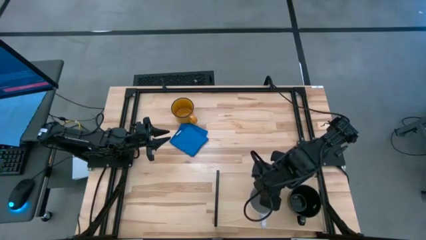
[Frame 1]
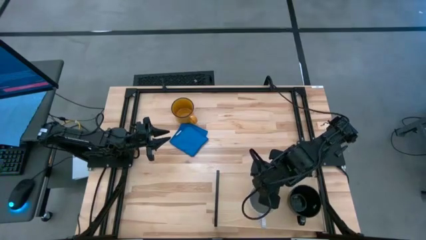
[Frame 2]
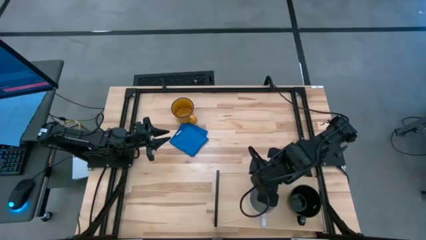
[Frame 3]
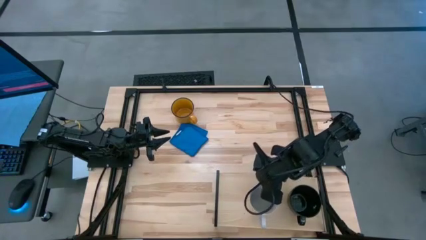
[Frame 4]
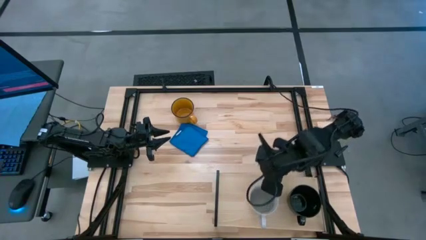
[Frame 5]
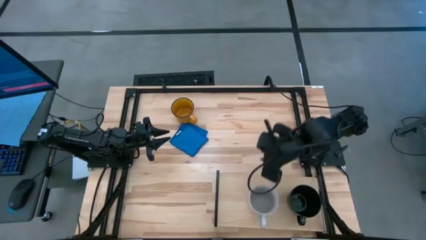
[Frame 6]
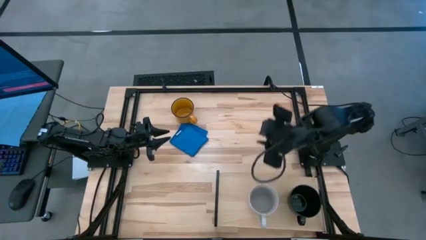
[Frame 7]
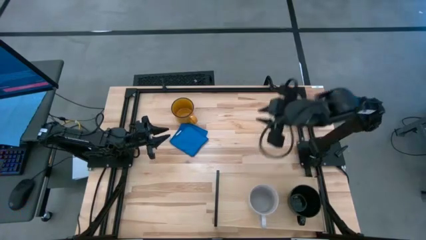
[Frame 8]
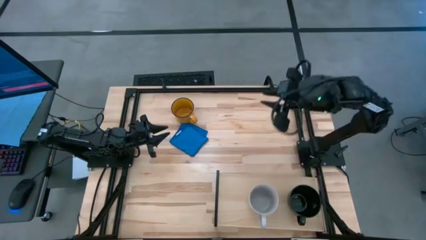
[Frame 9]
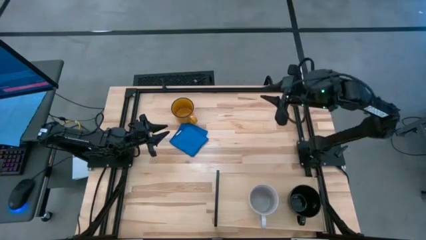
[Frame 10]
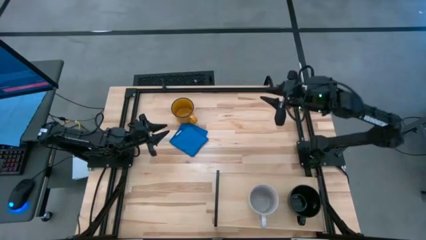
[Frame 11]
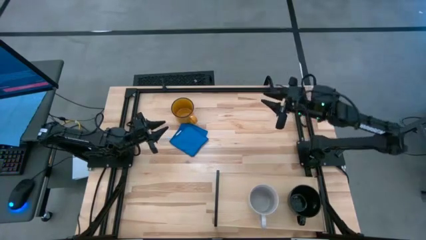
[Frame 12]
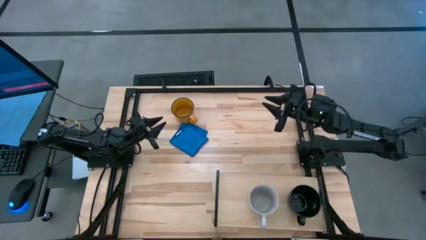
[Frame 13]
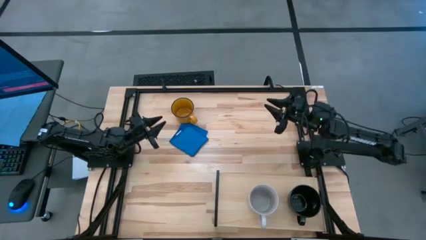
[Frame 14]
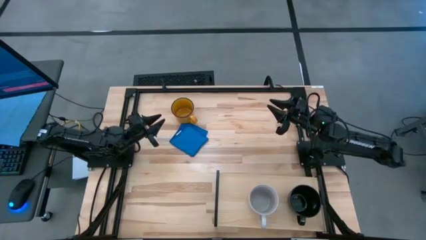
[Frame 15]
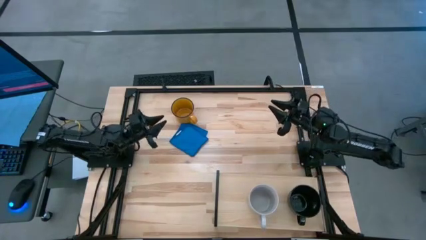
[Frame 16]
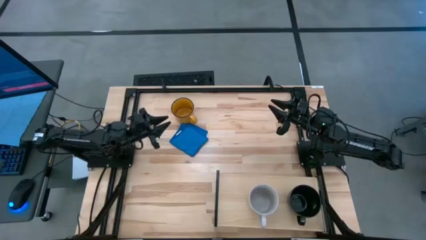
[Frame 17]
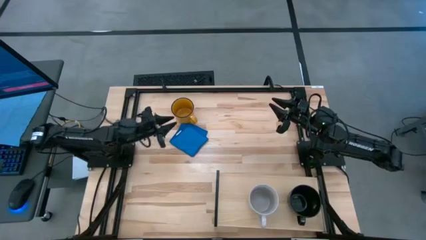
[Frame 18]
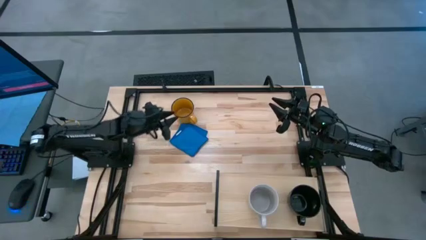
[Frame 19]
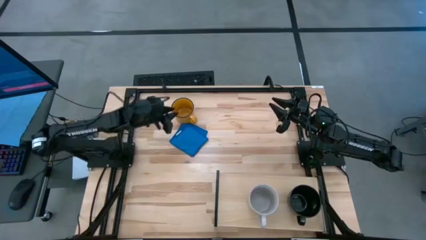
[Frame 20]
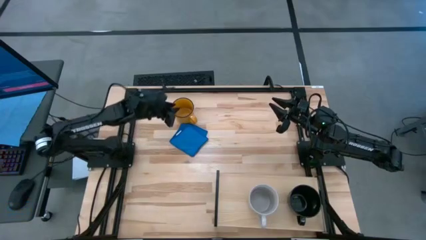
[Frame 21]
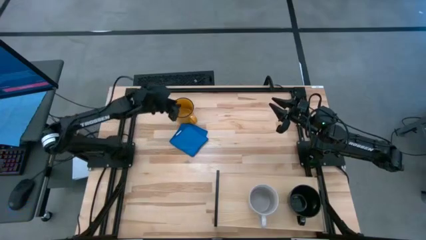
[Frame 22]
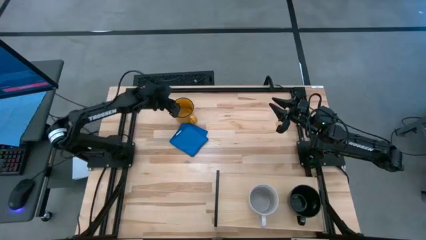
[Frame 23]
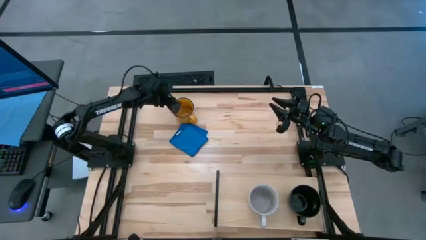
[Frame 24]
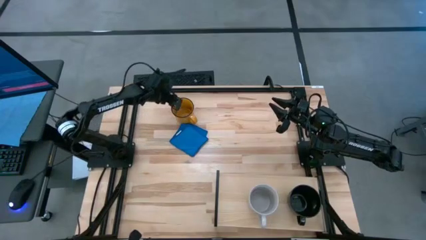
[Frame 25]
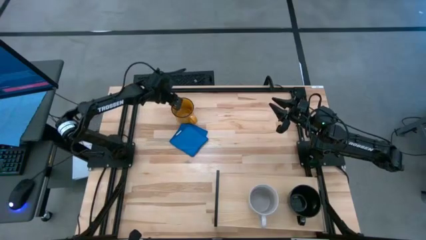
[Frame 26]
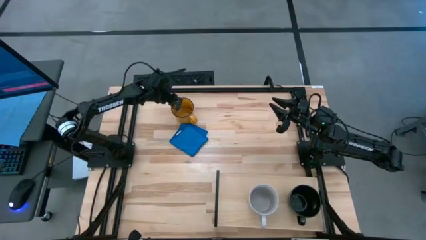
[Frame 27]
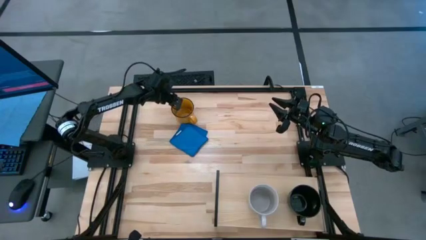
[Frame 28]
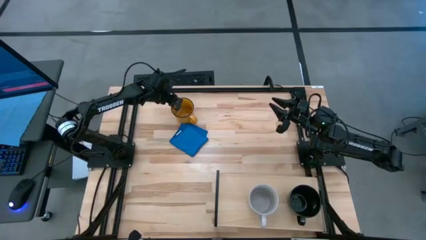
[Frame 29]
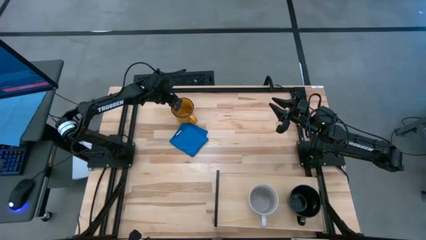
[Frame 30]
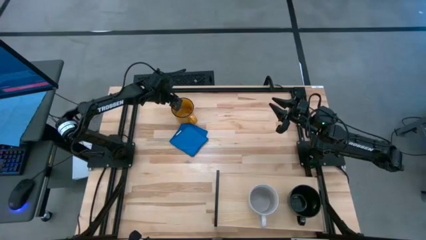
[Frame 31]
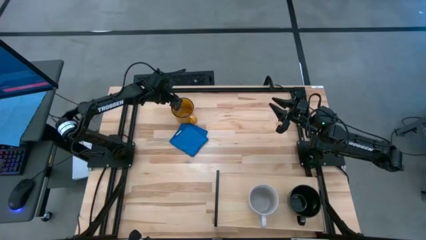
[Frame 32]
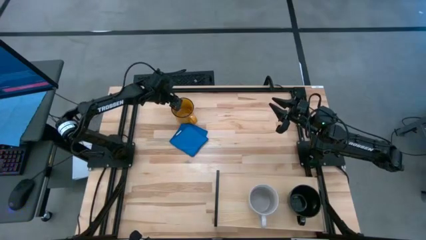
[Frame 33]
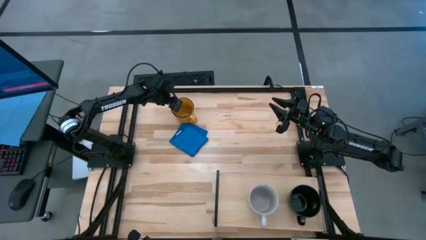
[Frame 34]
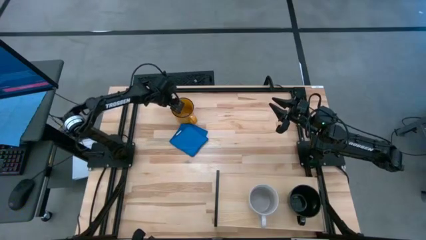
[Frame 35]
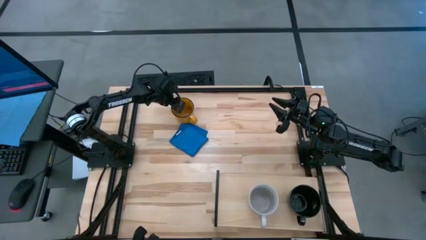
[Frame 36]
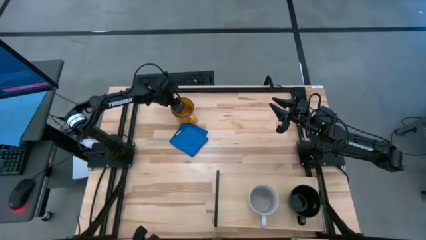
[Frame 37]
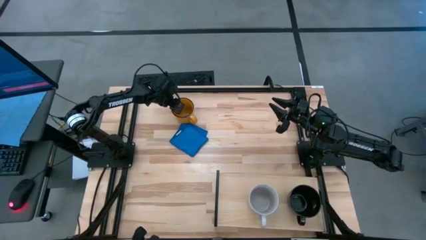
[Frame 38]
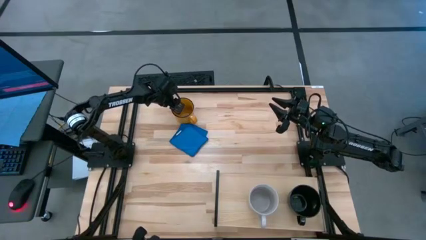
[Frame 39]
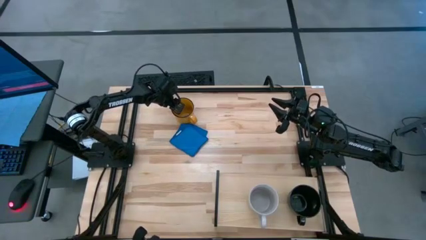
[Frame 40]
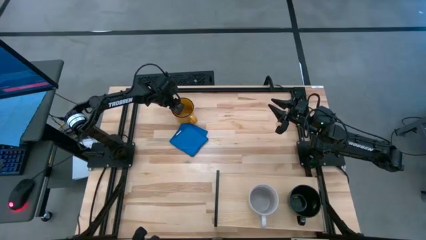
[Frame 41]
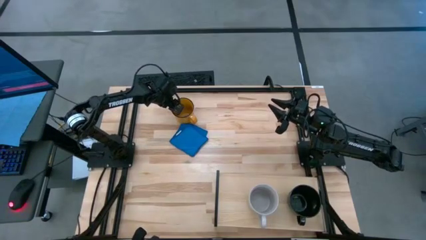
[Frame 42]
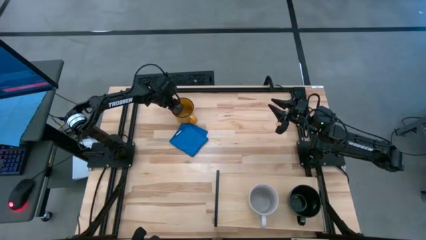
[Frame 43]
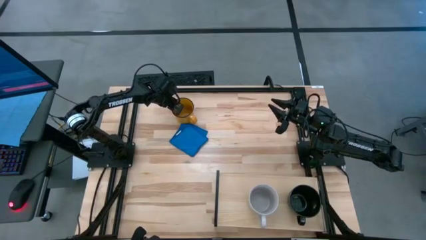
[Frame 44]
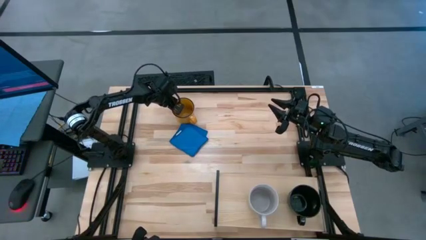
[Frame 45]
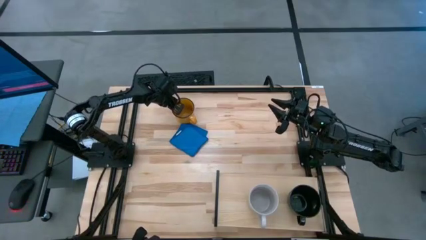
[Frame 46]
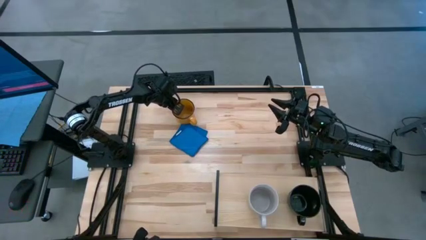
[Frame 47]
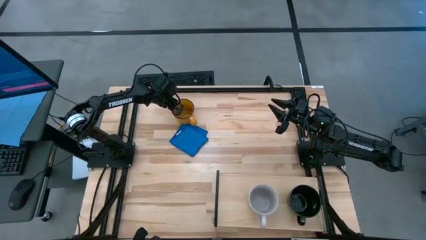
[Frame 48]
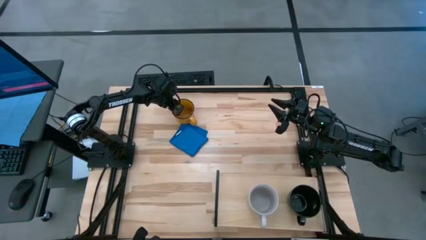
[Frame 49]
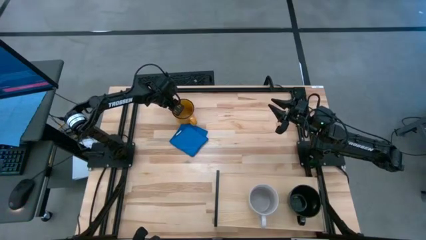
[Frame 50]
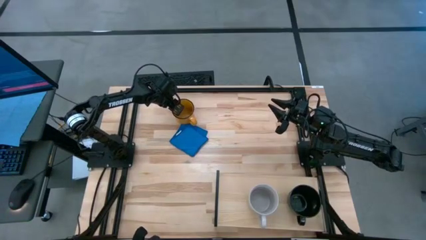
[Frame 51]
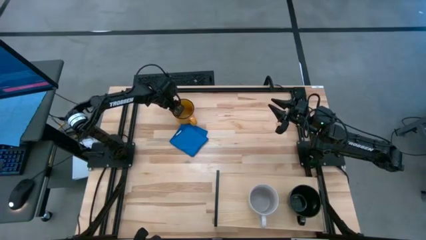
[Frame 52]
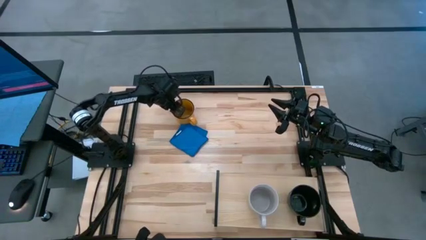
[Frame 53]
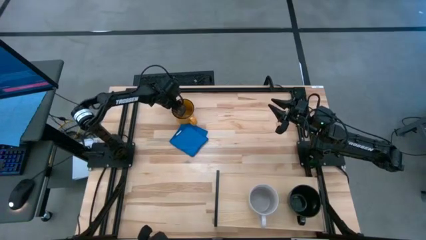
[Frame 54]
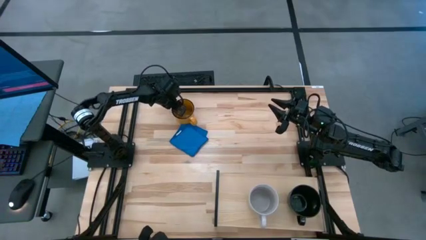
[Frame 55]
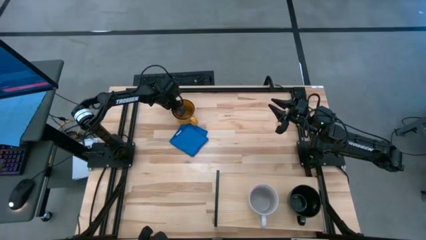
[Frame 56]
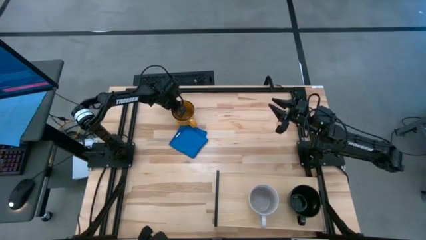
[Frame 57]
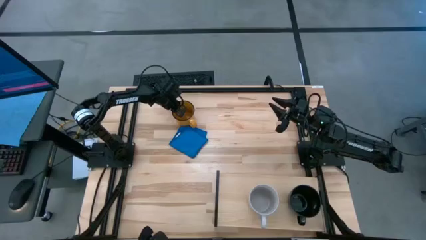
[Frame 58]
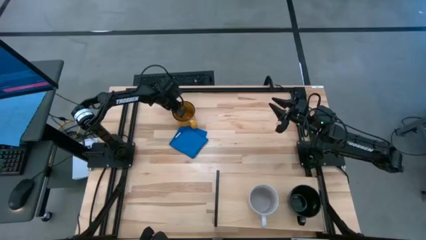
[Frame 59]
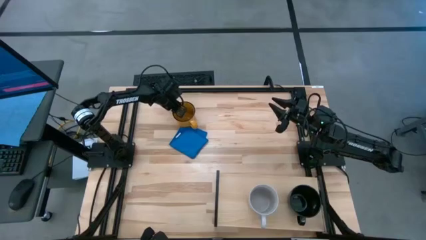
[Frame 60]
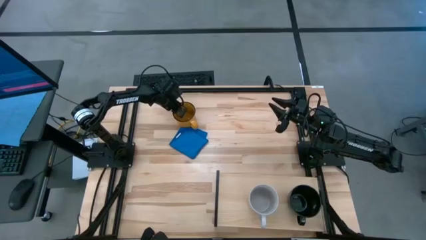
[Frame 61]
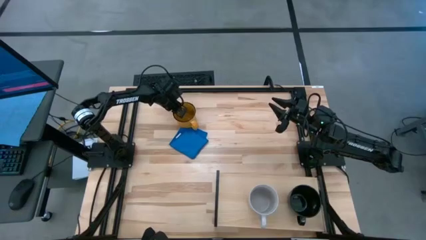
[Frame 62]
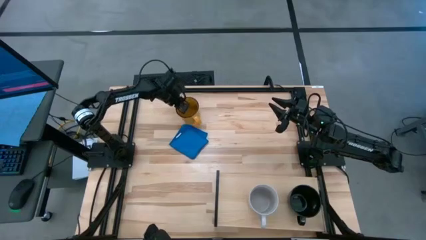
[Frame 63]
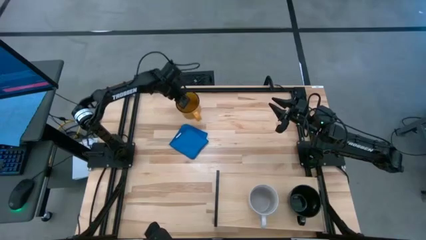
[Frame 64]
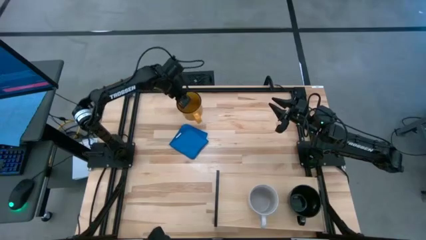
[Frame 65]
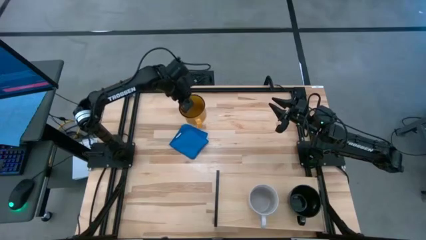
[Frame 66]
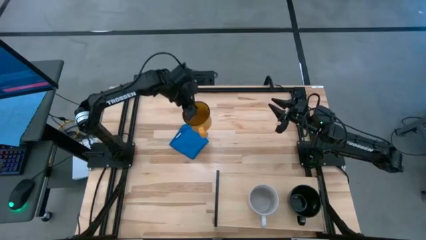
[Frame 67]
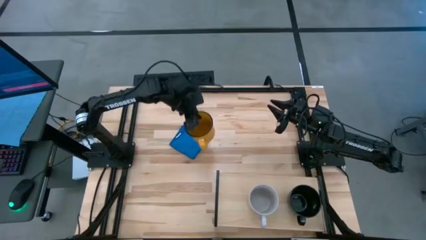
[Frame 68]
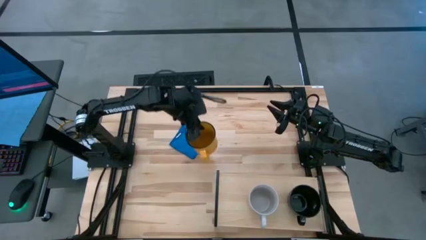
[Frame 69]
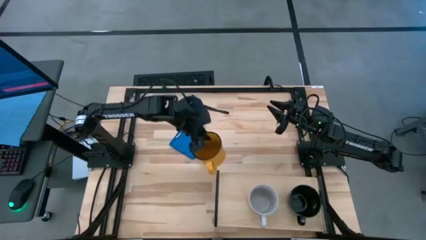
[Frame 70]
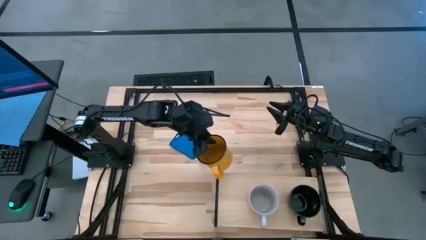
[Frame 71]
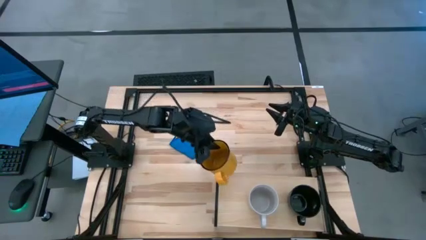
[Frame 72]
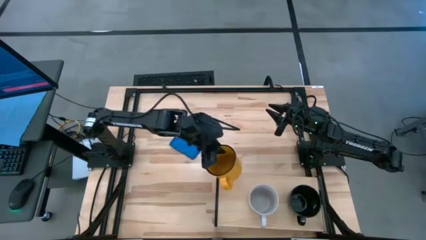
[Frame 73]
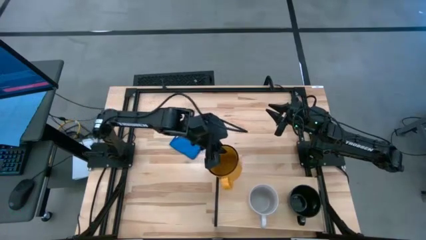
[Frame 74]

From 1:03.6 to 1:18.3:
Task: Stack small to large cups/mugs on shelf
Put the yellow mug on the shelf
